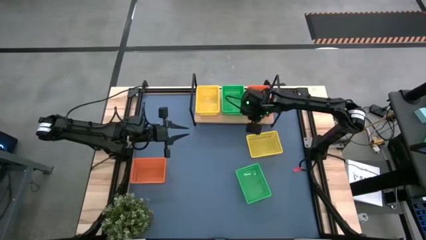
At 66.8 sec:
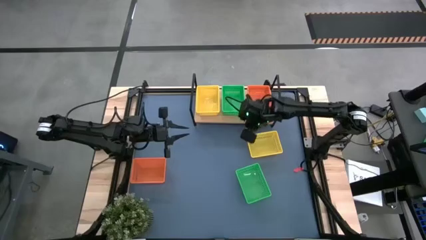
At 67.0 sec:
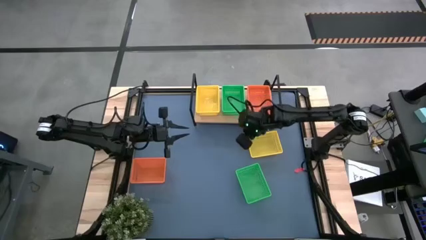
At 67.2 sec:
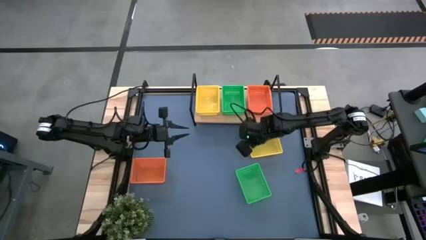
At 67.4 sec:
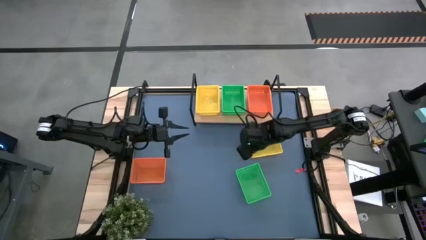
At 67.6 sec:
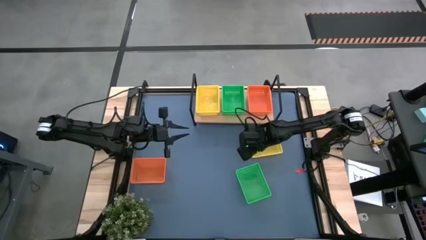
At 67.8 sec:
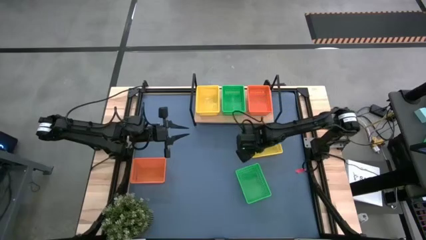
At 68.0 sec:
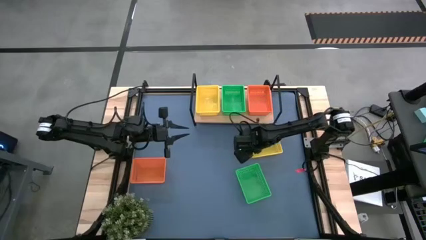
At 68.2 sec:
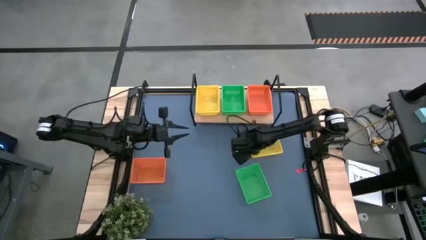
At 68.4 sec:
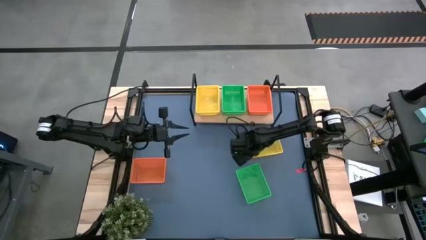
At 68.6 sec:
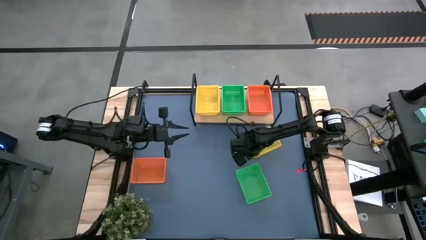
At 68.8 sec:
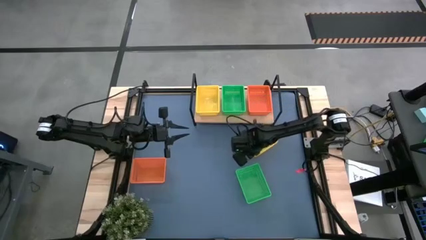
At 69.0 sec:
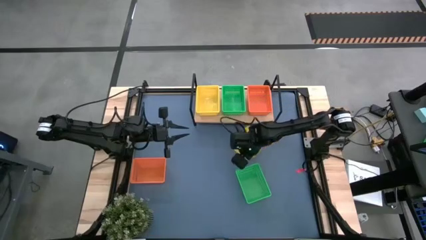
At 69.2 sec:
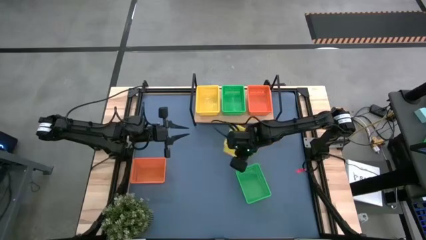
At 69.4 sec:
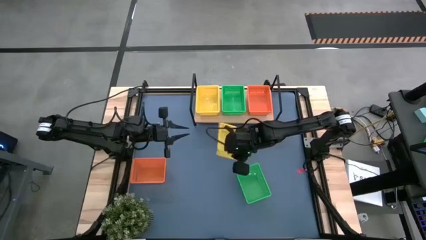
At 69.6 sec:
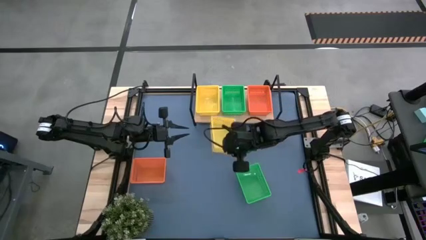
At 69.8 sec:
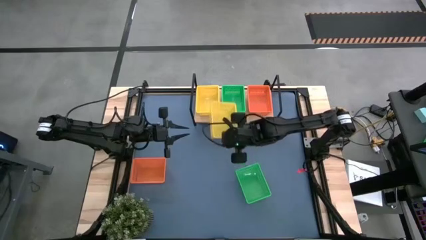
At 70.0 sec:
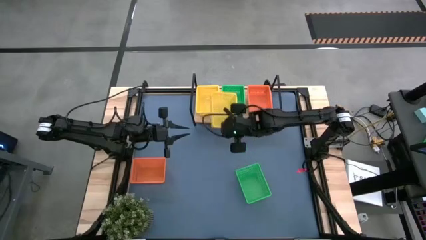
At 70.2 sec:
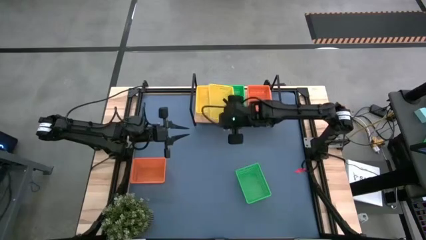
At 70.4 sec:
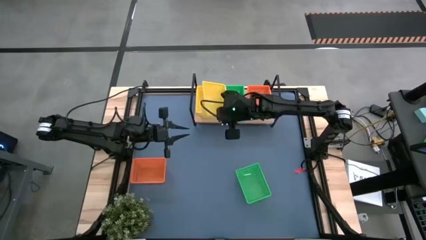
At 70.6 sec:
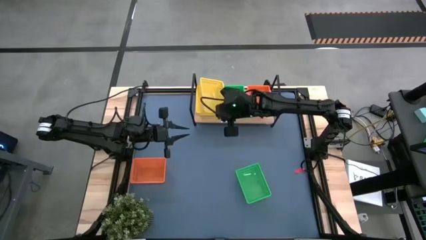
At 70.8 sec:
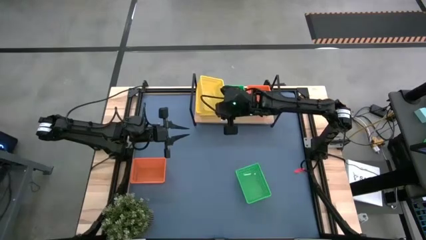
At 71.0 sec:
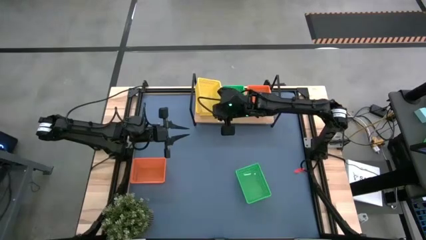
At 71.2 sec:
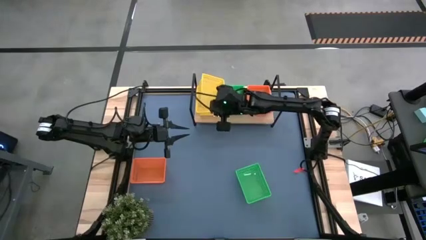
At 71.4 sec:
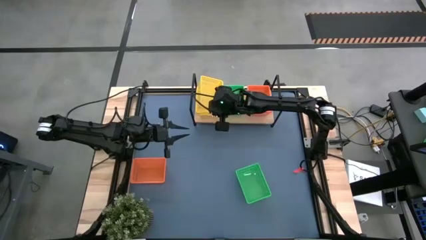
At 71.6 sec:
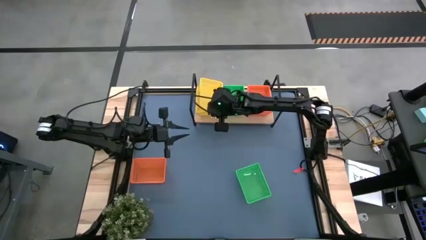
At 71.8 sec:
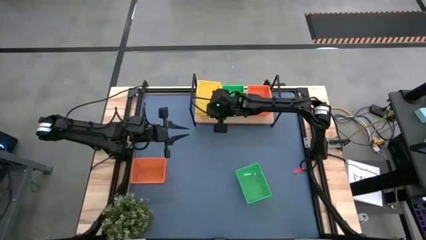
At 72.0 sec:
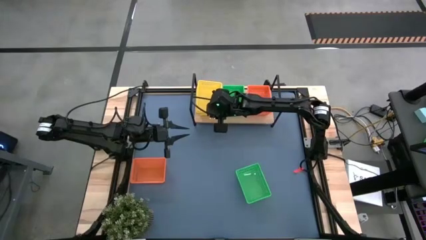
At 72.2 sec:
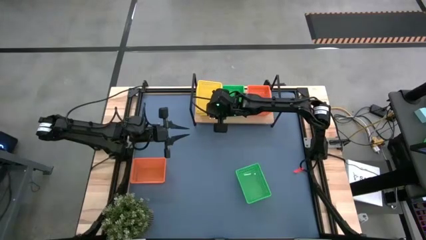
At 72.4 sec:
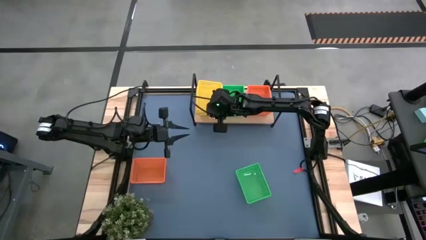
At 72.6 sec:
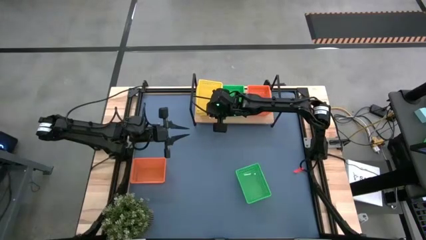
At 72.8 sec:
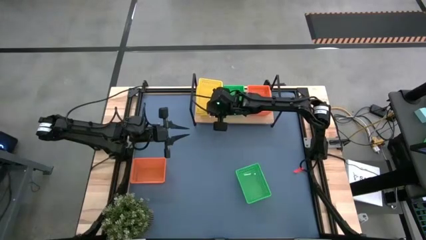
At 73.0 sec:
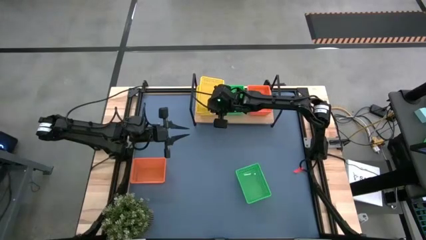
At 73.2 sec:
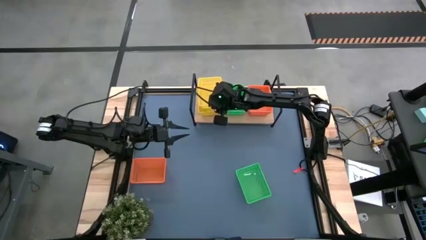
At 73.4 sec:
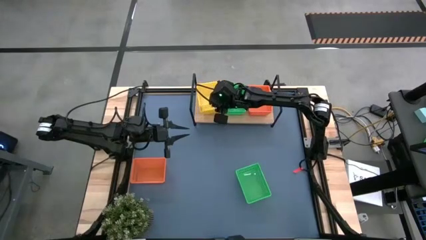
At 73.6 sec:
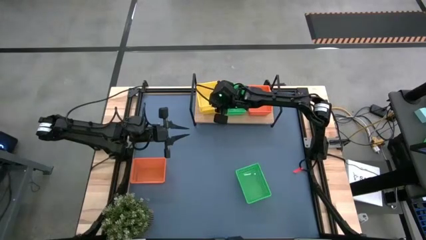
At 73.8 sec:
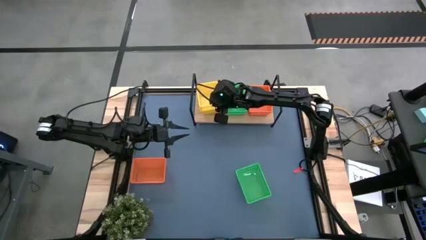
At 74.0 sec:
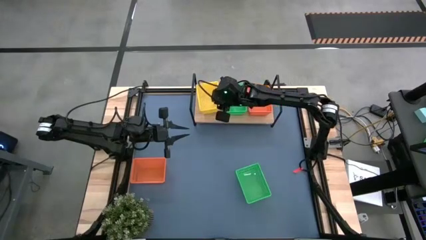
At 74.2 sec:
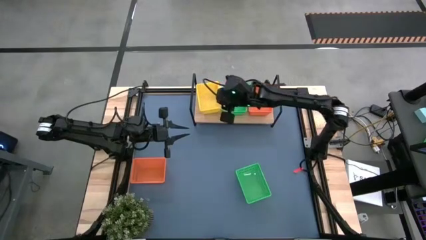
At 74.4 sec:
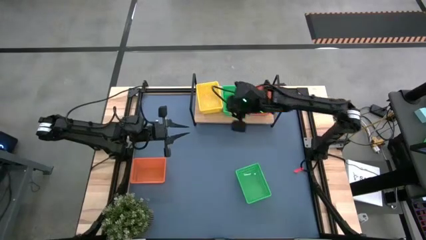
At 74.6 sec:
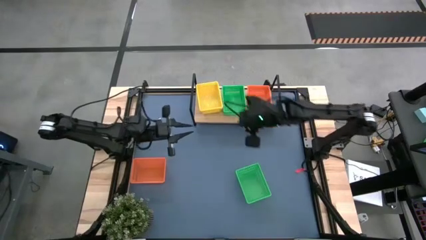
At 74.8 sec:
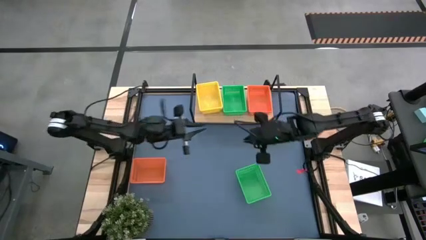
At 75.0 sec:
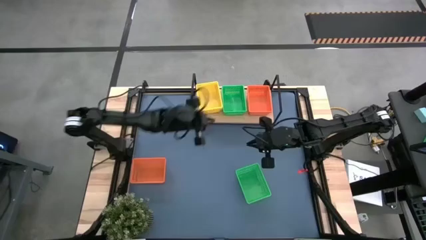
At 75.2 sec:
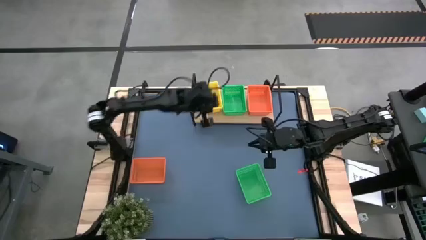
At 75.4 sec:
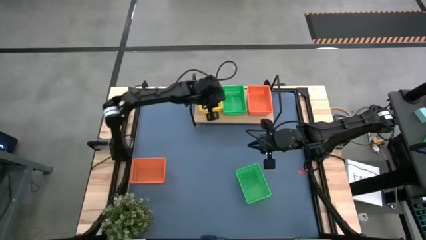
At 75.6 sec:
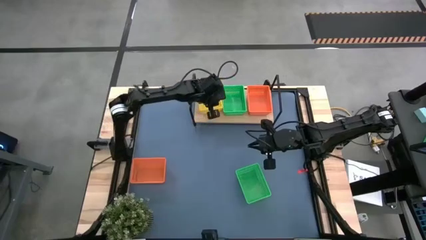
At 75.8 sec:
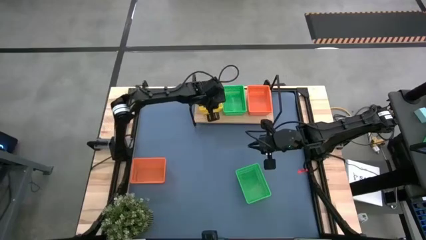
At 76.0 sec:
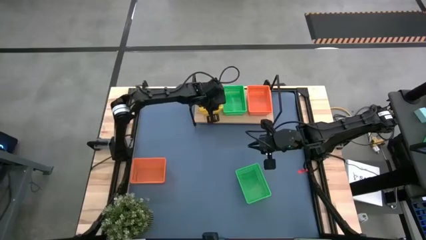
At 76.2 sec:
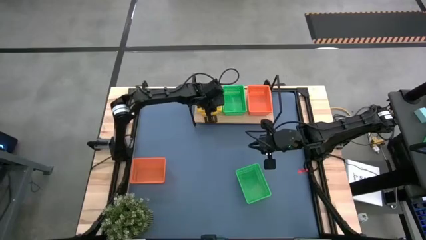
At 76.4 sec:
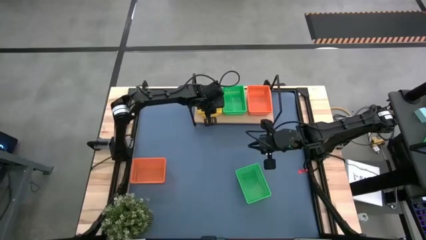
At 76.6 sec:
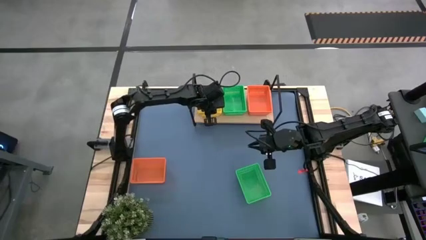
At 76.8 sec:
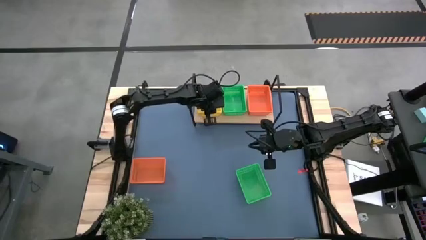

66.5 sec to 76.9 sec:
Task: Stack baskets on shelf by color
Stack the yellow bin on top of the yellow bin on the shelf

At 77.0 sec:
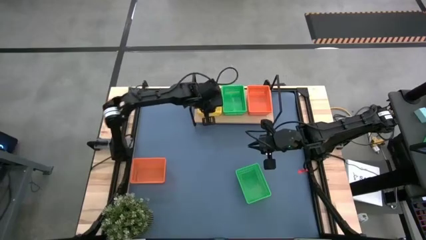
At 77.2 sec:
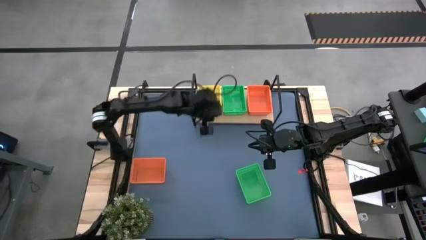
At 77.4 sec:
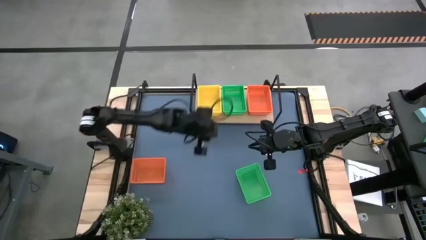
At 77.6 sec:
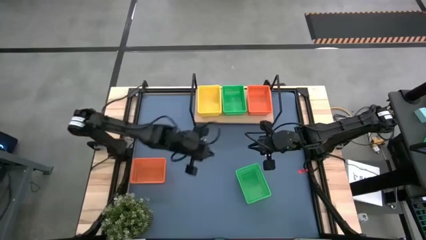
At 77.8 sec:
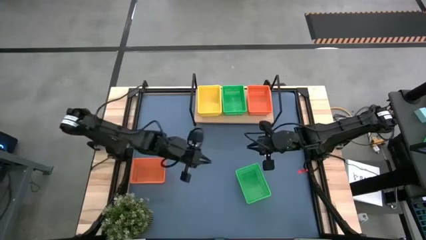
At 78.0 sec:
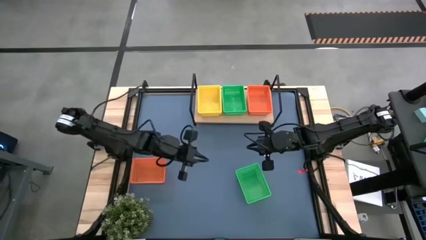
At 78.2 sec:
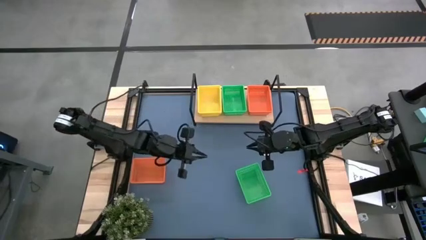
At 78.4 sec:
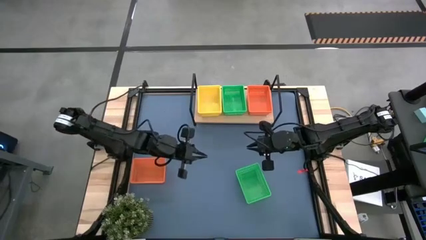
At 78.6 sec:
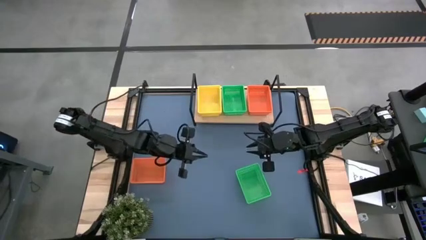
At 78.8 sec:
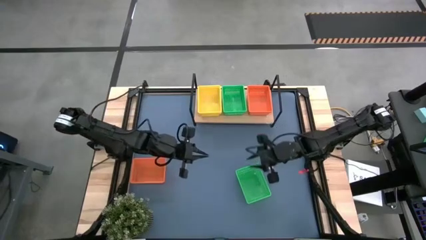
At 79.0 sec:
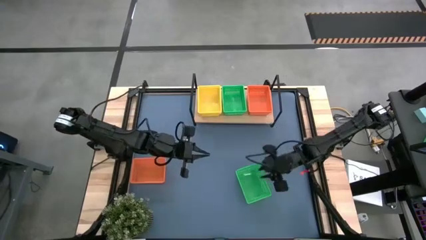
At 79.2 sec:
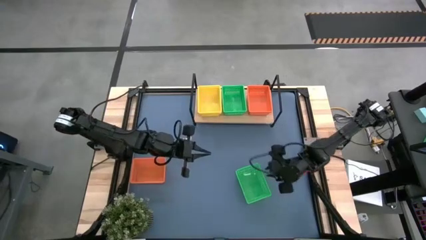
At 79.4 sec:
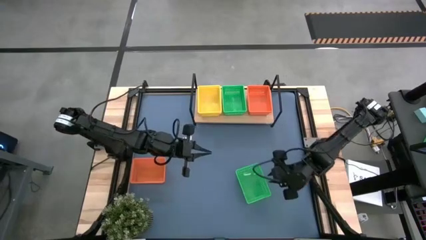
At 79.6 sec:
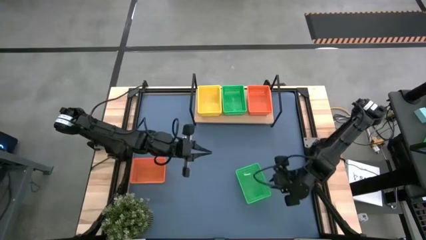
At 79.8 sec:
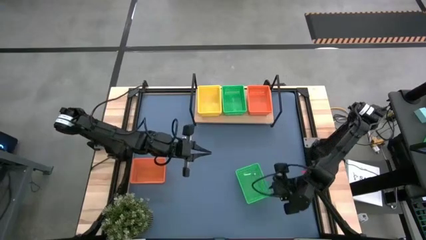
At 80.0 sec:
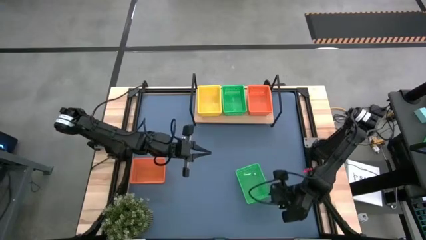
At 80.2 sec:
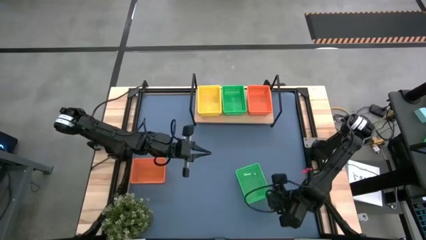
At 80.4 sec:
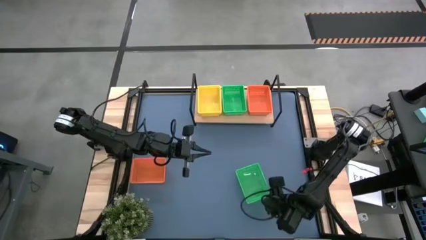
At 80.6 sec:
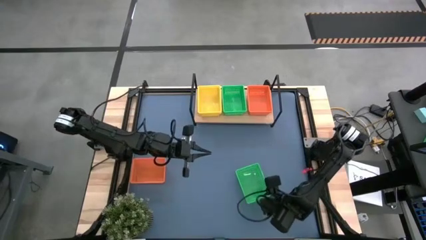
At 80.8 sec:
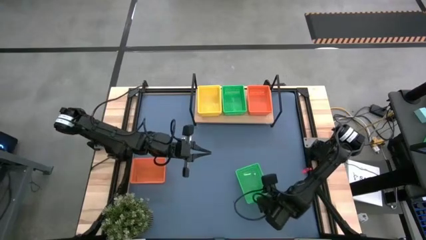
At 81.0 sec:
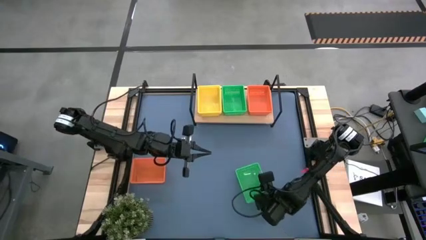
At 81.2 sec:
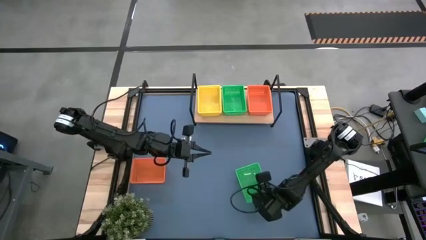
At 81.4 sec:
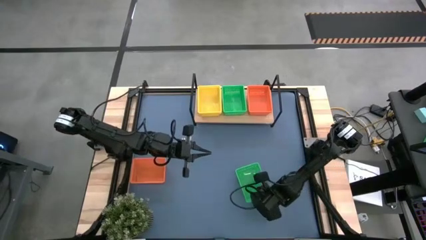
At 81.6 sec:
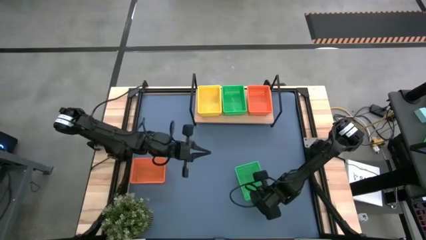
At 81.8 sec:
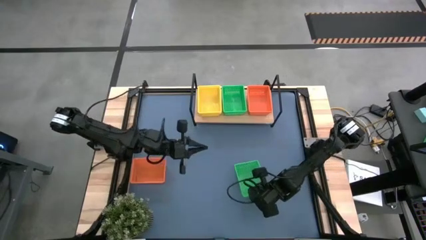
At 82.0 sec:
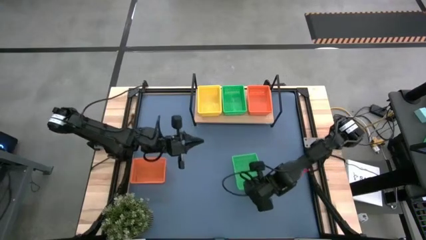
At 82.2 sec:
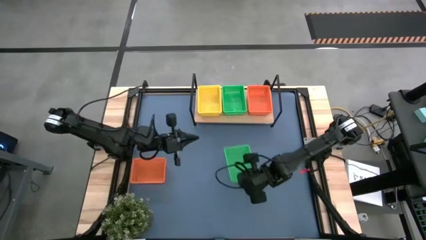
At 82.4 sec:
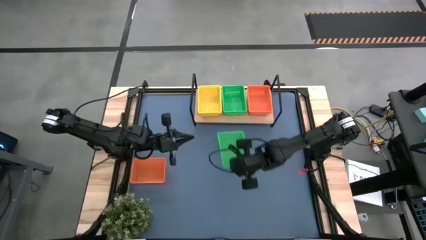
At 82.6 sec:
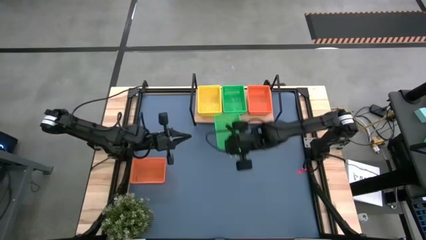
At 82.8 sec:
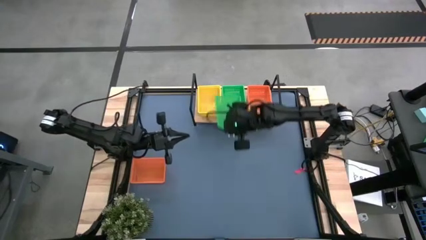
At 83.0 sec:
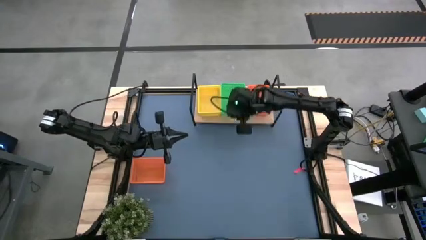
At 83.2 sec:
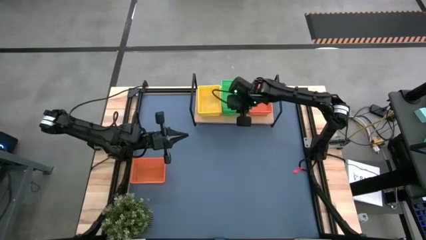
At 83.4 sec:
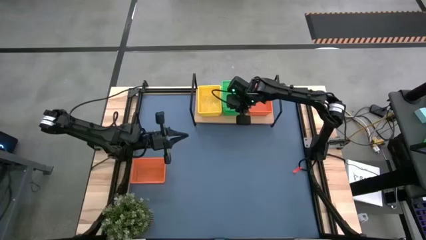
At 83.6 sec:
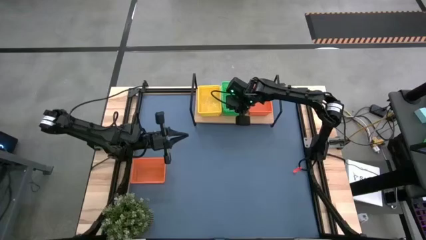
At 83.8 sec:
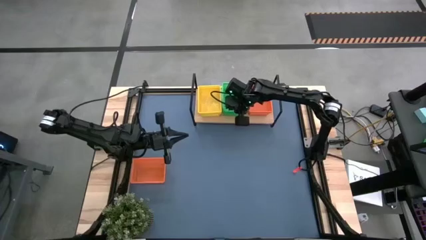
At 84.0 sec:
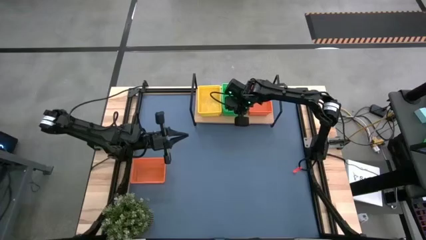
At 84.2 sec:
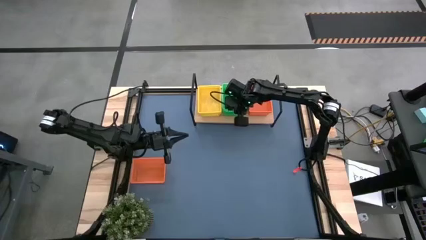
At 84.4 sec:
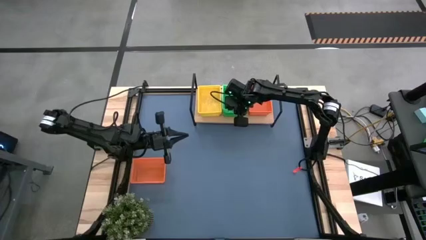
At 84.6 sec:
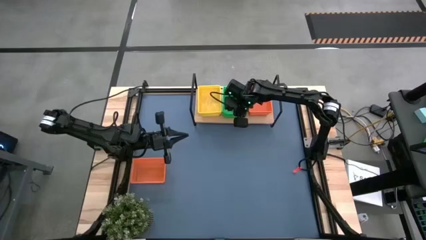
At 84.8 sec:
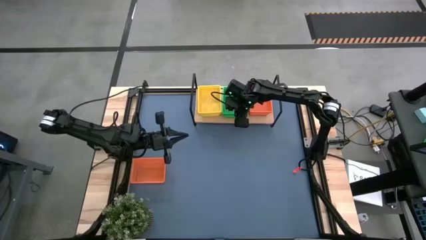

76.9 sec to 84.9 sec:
Stack the green bin on top of the green bin on the shelf
